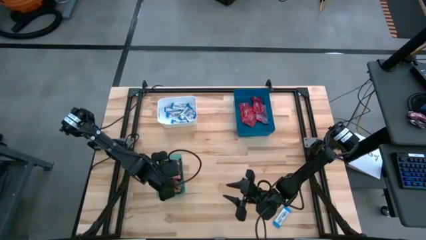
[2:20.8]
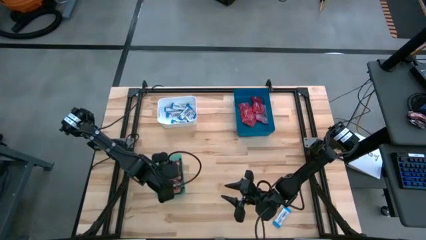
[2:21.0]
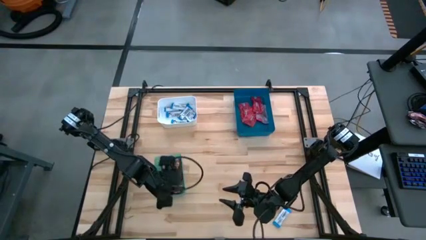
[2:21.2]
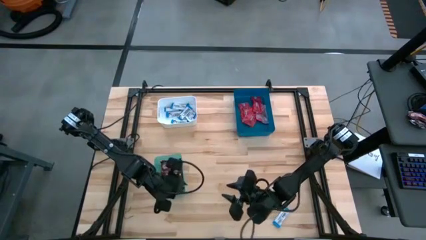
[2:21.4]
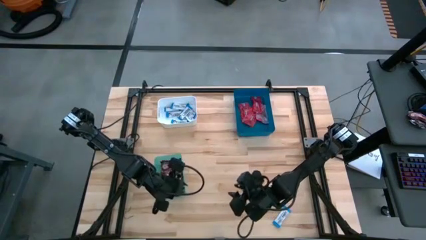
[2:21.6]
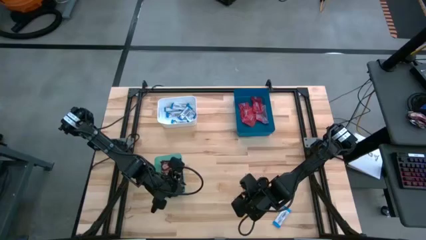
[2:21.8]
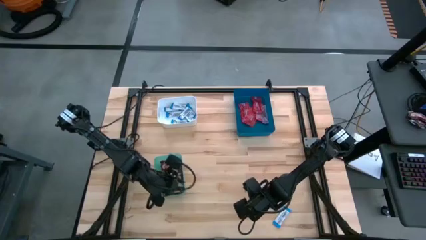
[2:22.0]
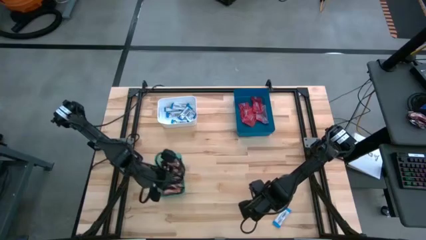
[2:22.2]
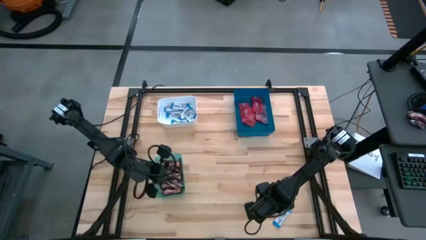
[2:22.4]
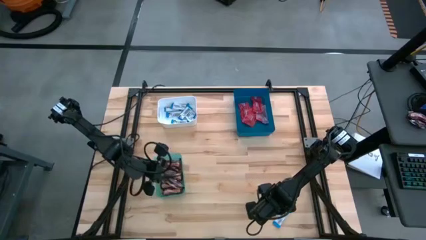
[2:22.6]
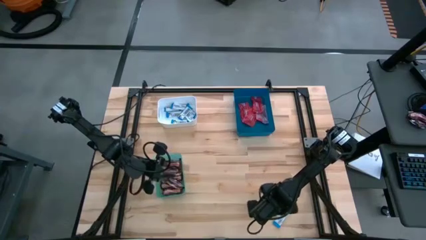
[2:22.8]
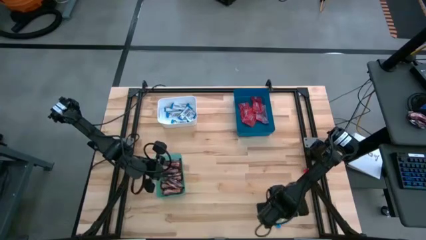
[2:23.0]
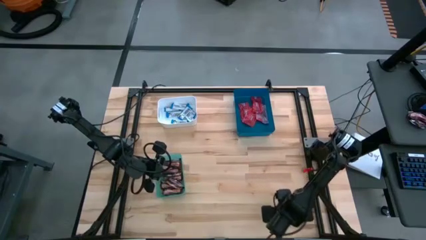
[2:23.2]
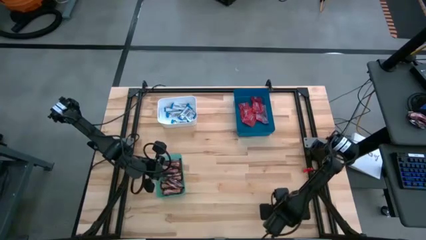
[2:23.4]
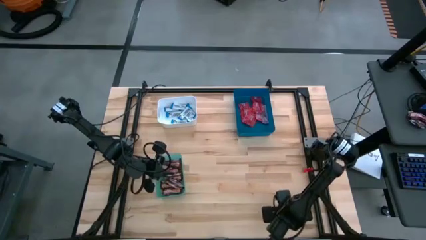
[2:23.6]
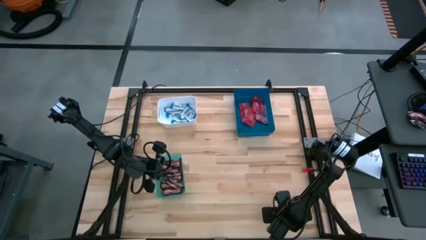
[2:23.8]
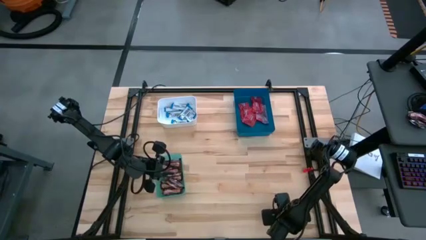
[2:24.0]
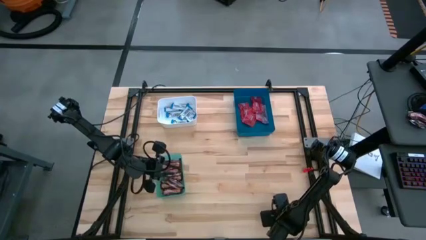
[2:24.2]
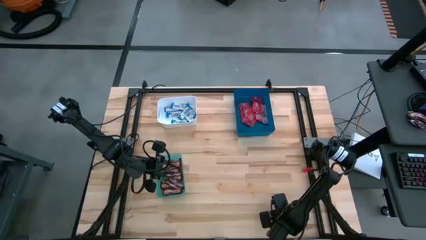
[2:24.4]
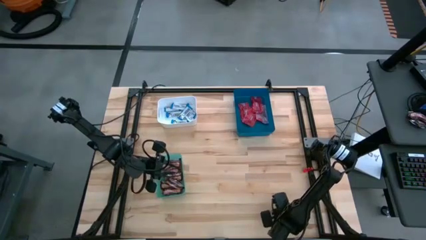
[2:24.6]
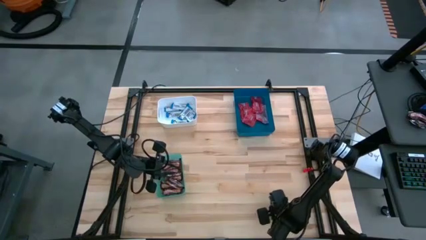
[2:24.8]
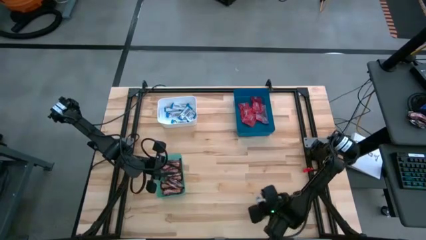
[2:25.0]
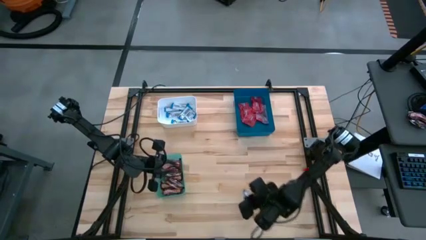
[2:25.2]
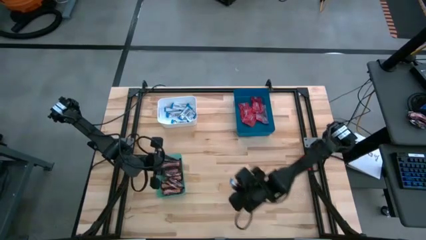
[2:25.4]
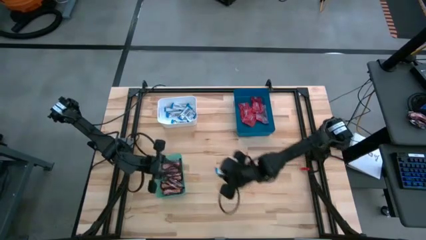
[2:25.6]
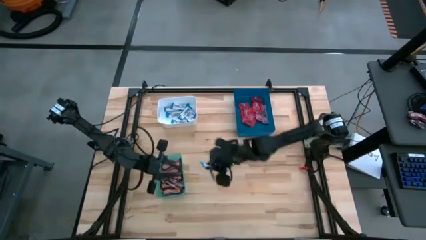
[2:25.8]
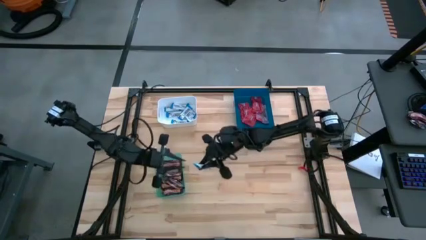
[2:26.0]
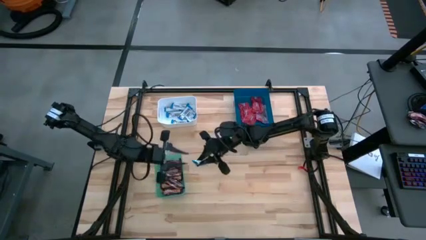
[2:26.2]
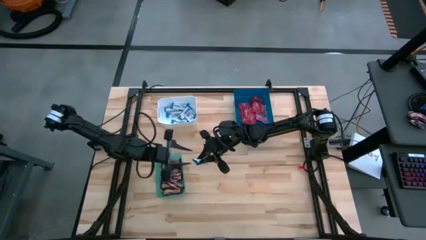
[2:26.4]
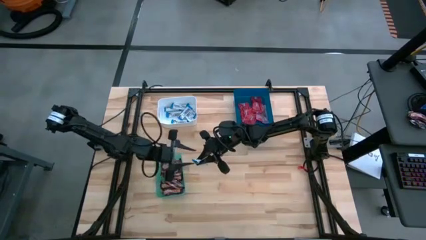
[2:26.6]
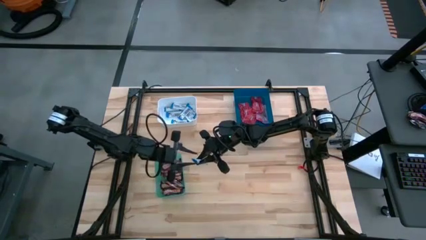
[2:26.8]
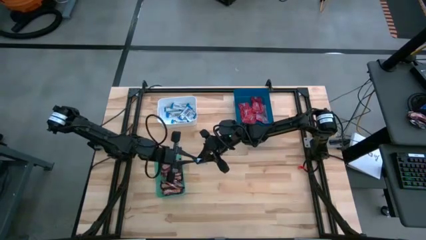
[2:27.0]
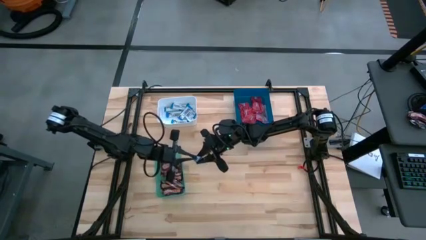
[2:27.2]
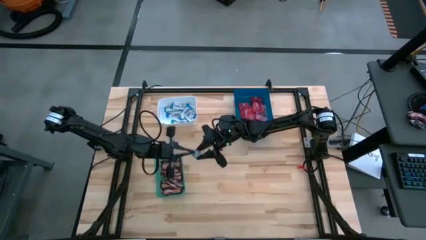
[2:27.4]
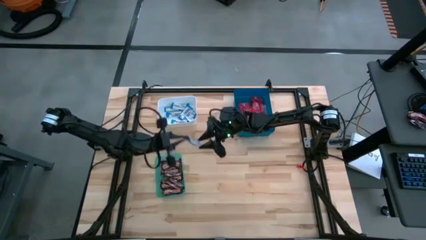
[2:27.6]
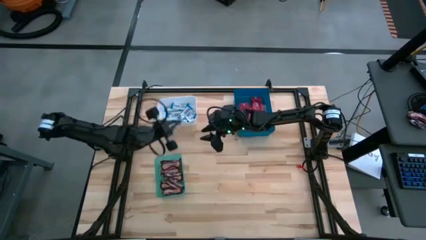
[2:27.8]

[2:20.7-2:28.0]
Task: Sort candy
Put the white chocolate bar into the white bin

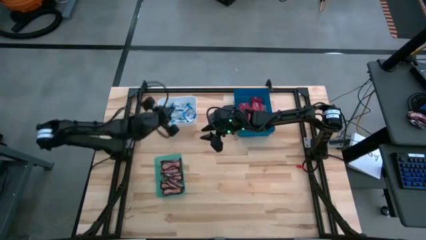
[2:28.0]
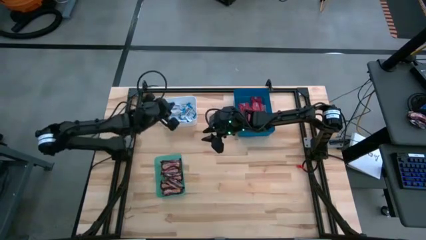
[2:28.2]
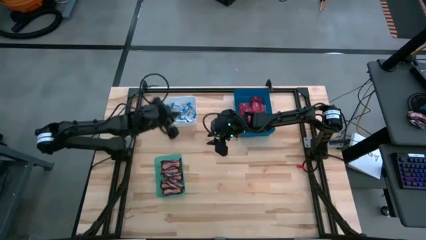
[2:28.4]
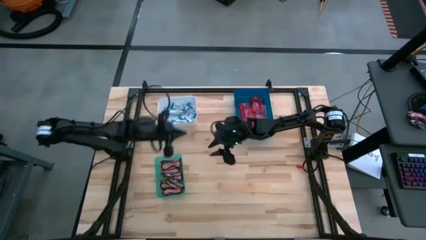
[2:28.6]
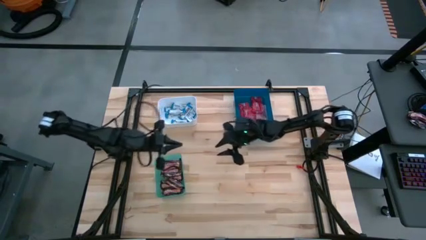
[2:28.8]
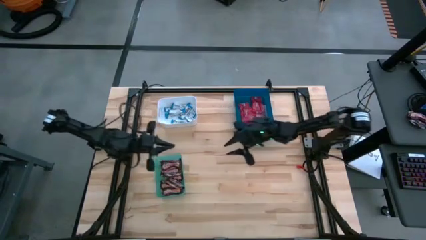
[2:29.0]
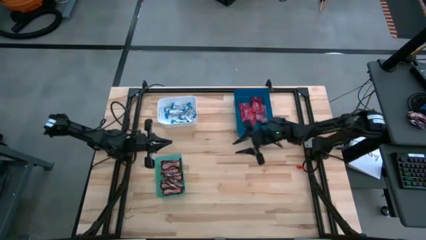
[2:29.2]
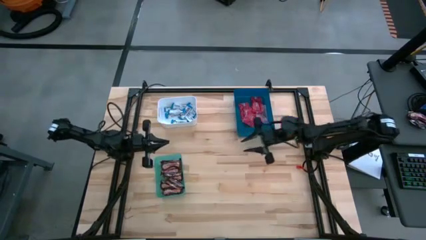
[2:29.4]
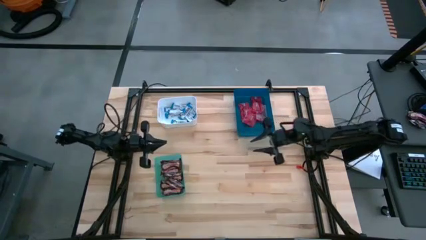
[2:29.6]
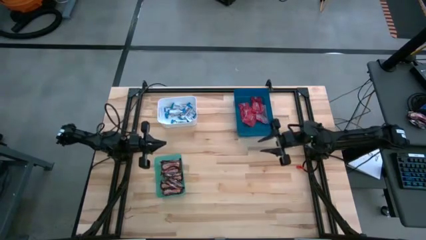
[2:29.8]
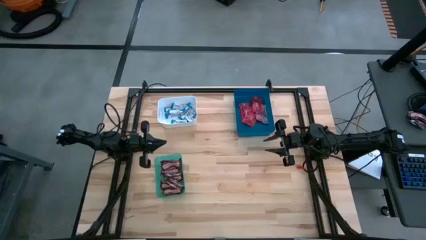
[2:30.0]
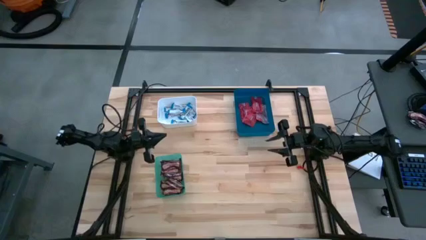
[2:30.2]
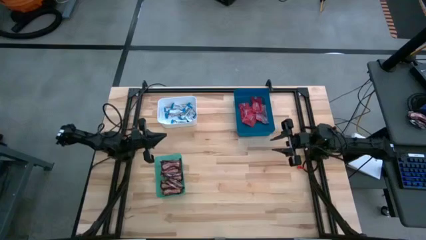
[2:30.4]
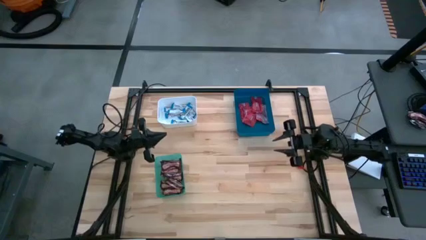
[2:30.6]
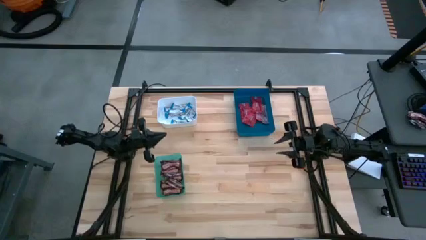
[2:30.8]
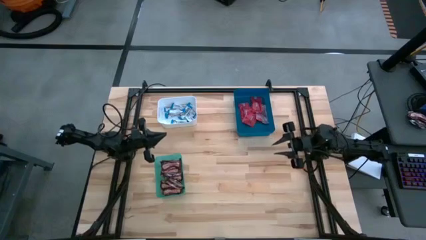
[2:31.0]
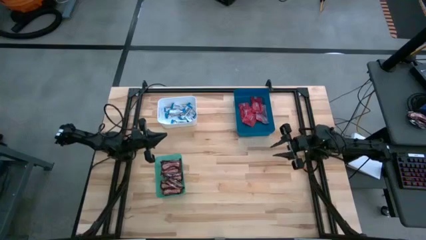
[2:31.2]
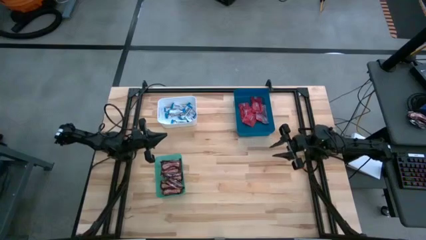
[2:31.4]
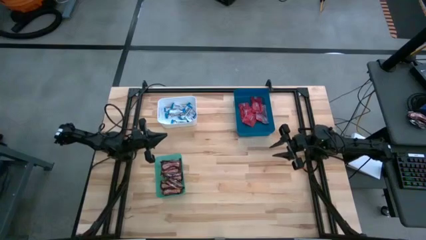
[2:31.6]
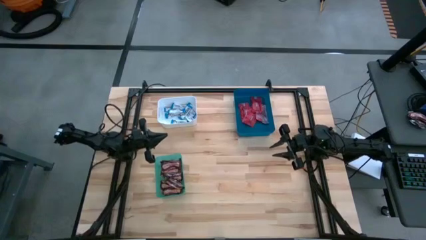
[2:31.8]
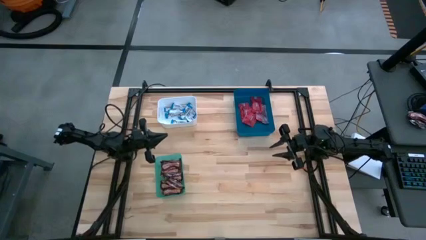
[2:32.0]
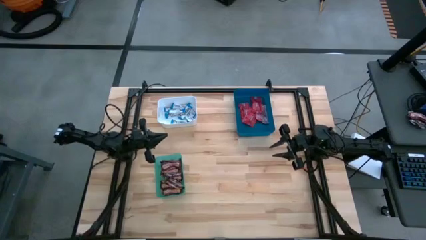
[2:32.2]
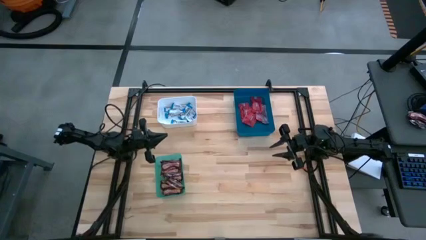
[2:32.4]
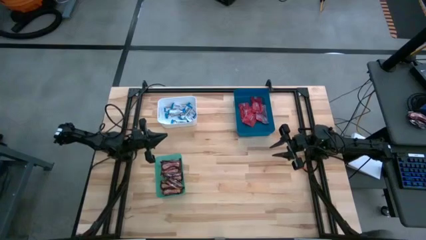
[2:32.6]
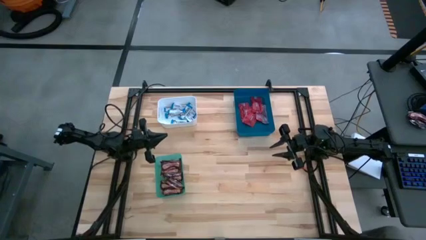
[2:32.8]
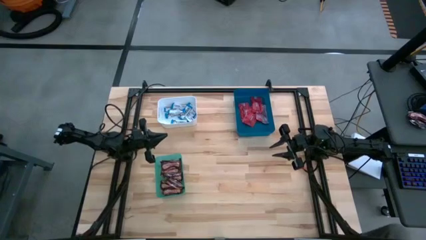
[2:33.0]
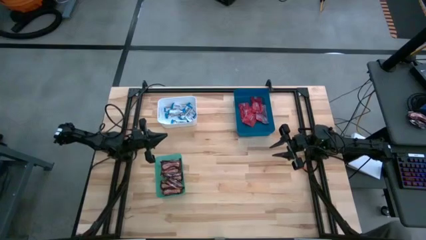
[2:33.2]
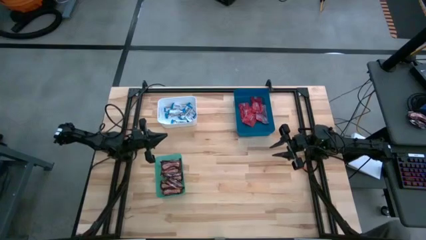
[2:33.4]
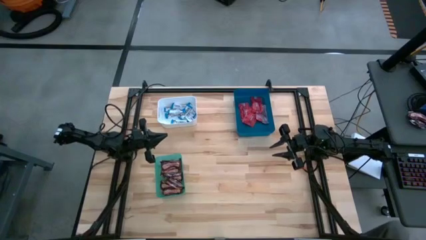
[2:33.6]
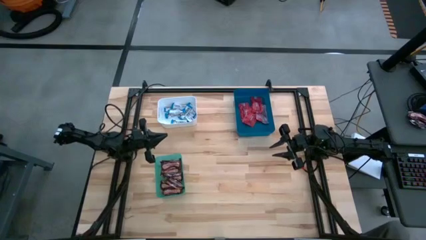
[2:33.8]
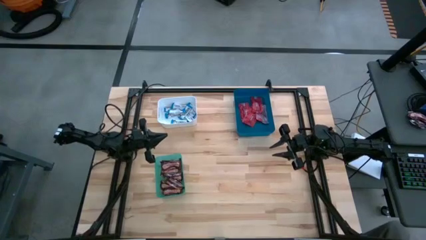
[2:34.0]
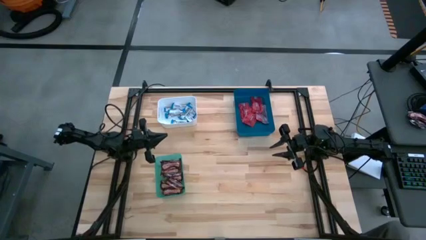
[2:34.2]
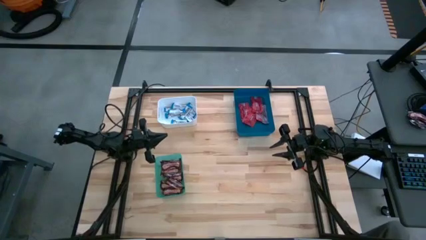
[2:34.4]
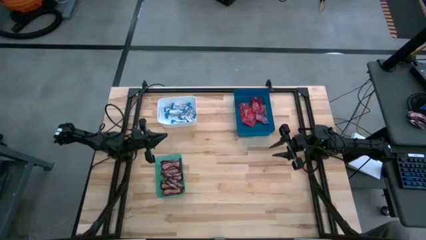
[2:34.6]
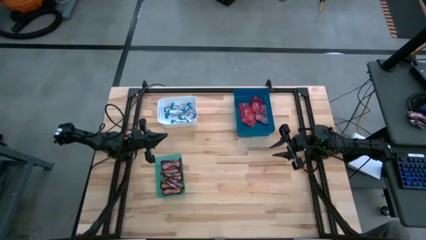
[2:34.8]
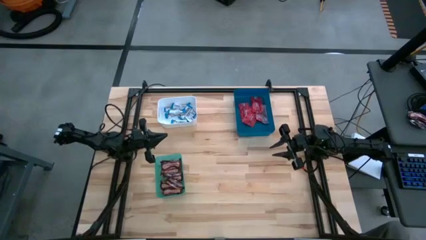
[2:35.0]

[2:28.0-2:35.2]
Return to Home Position
